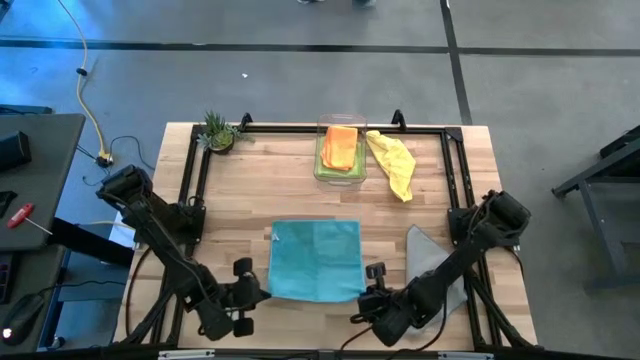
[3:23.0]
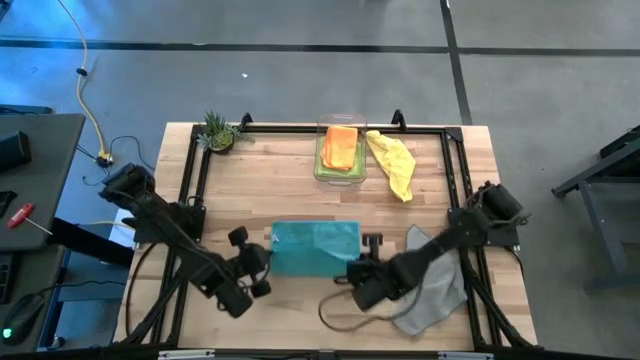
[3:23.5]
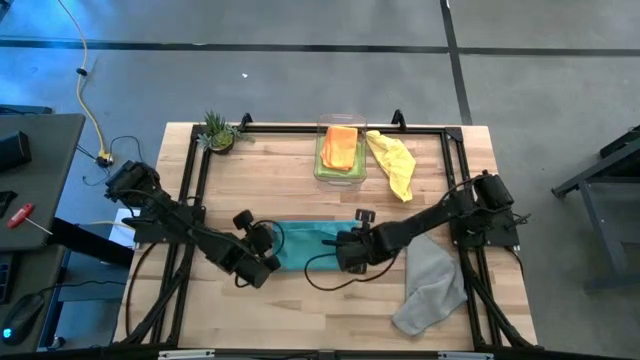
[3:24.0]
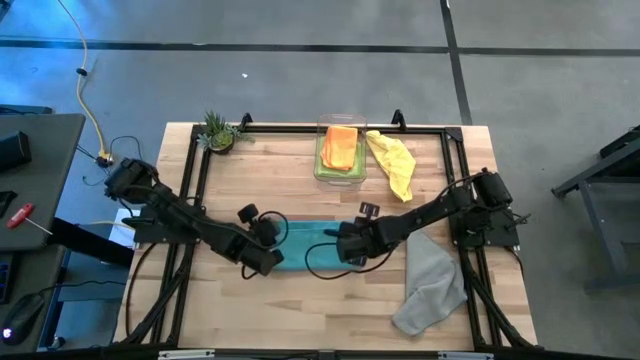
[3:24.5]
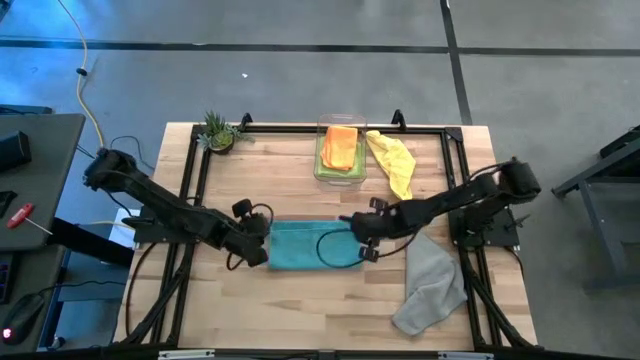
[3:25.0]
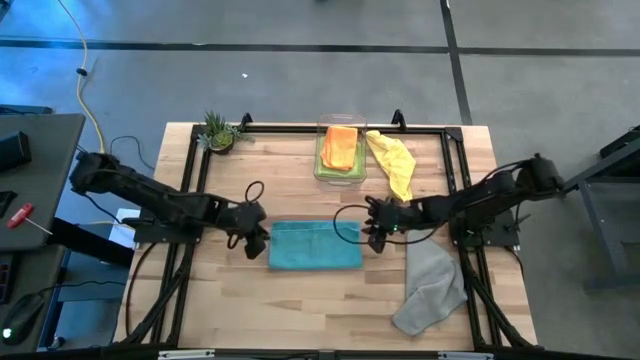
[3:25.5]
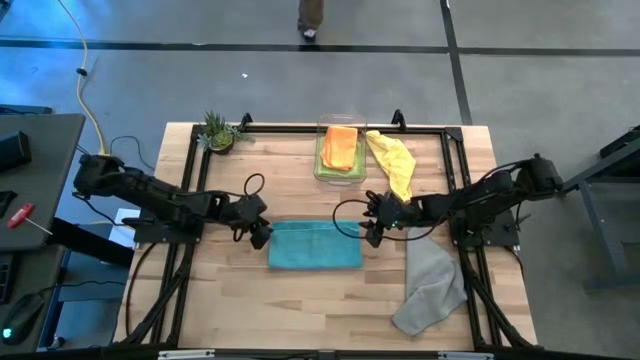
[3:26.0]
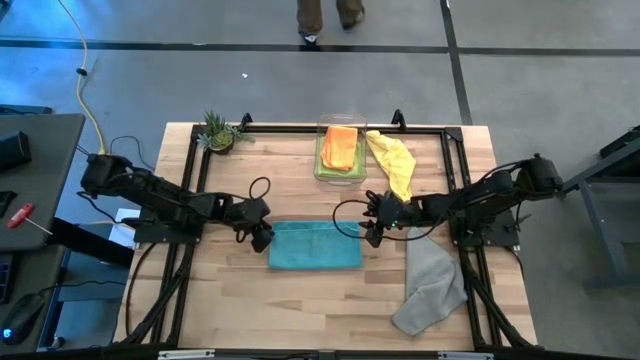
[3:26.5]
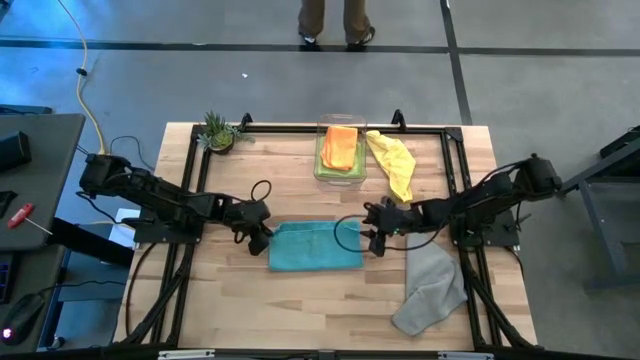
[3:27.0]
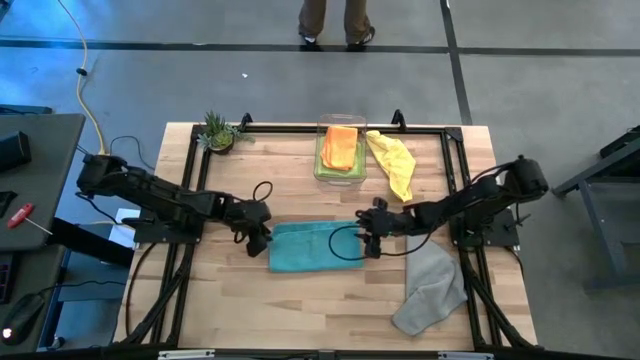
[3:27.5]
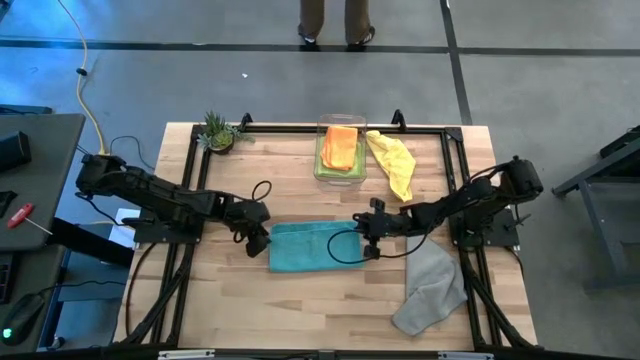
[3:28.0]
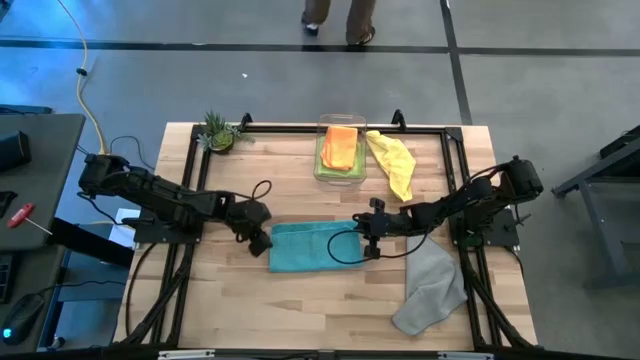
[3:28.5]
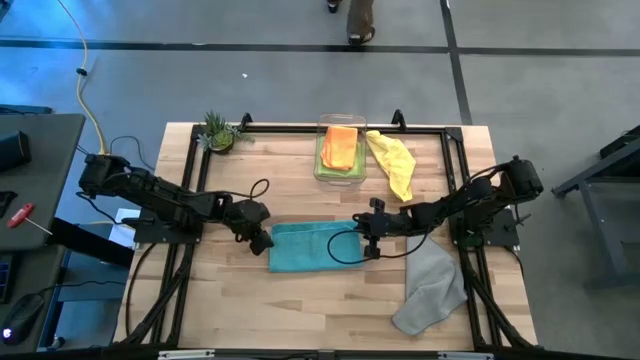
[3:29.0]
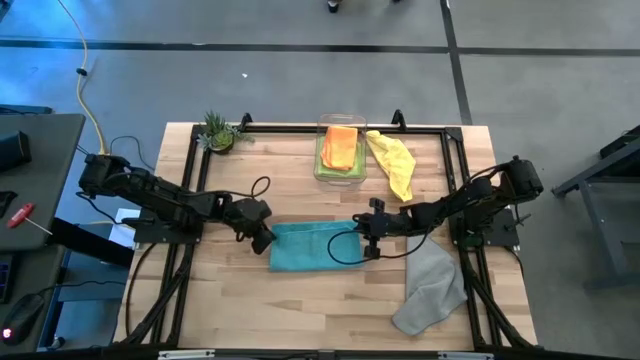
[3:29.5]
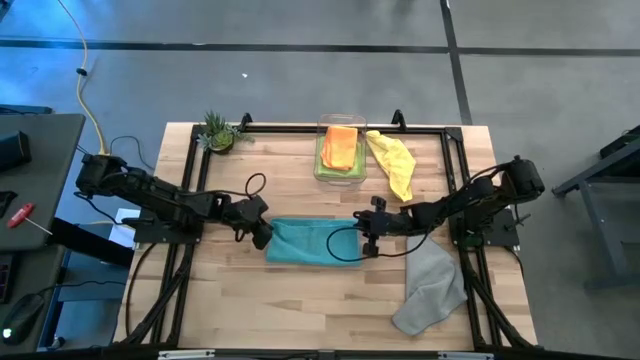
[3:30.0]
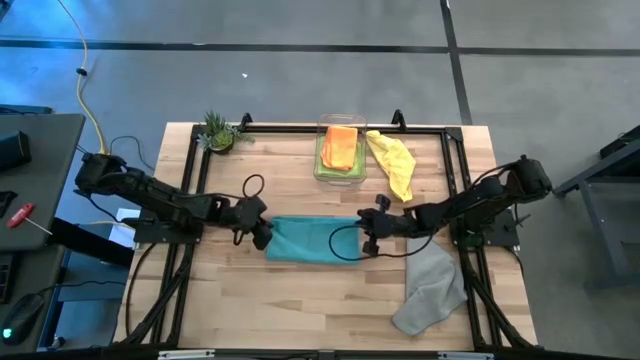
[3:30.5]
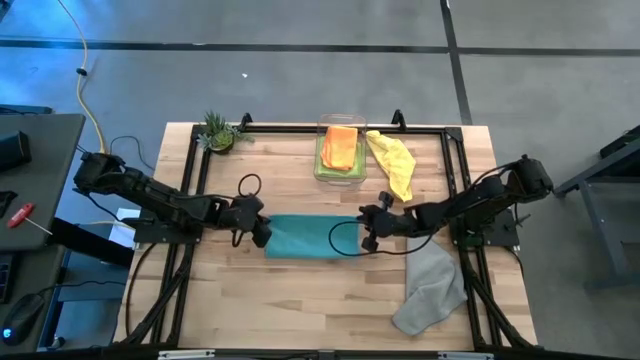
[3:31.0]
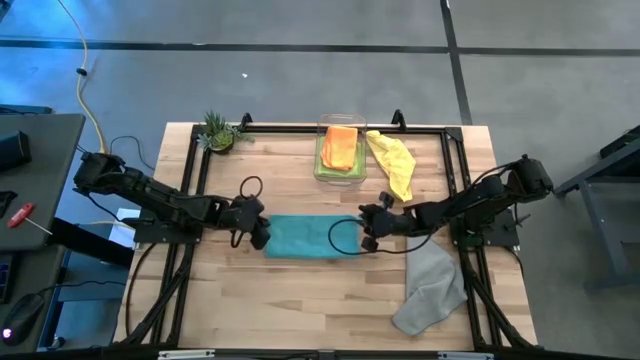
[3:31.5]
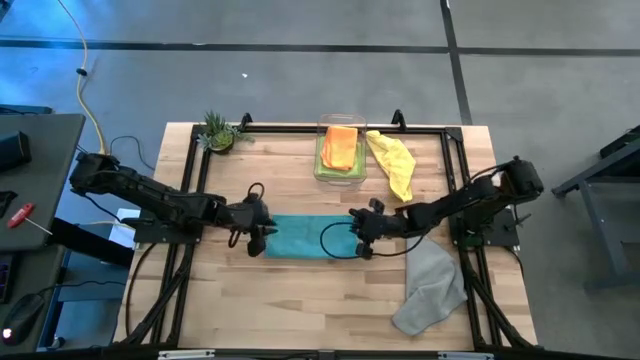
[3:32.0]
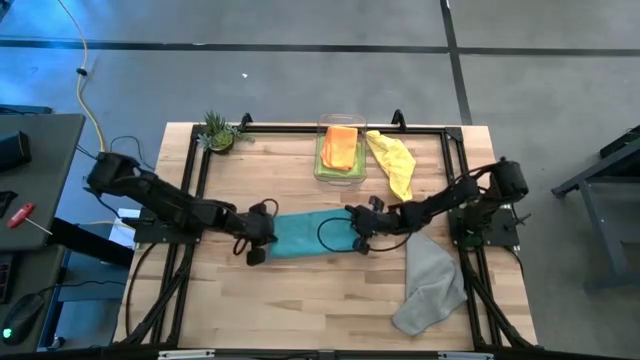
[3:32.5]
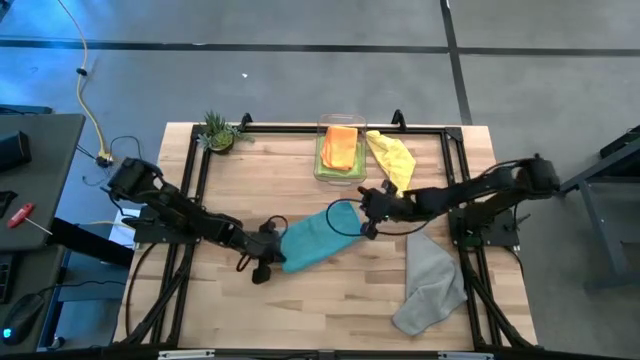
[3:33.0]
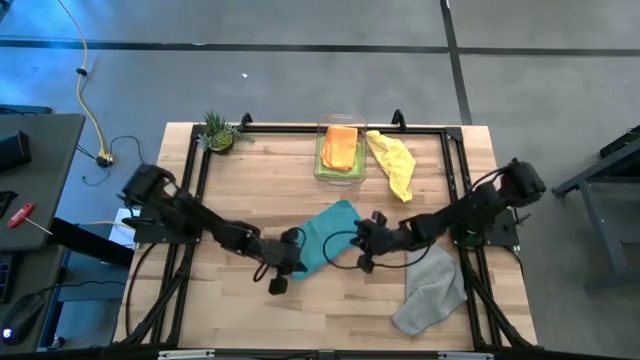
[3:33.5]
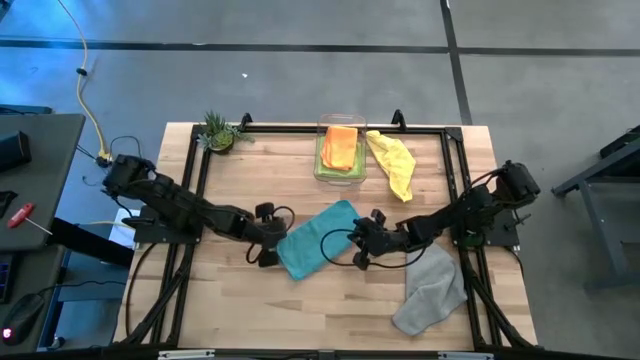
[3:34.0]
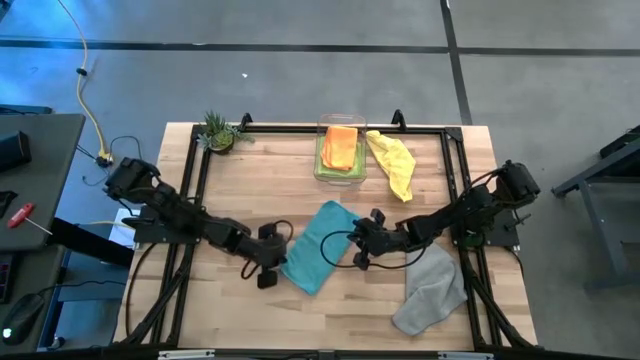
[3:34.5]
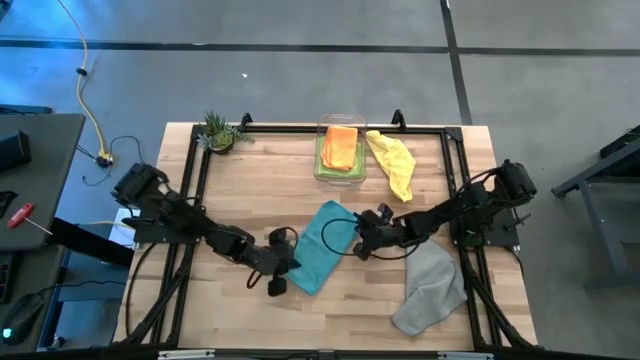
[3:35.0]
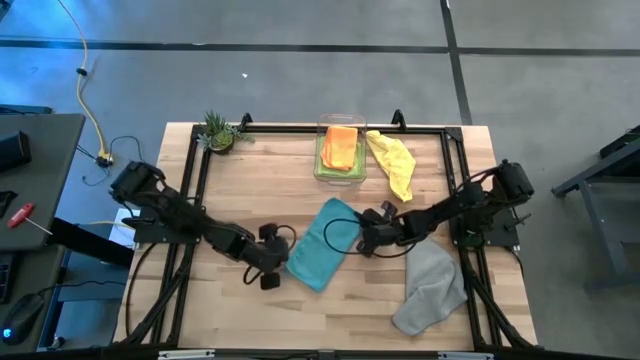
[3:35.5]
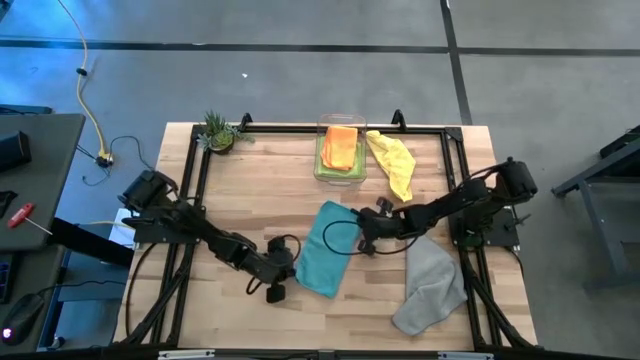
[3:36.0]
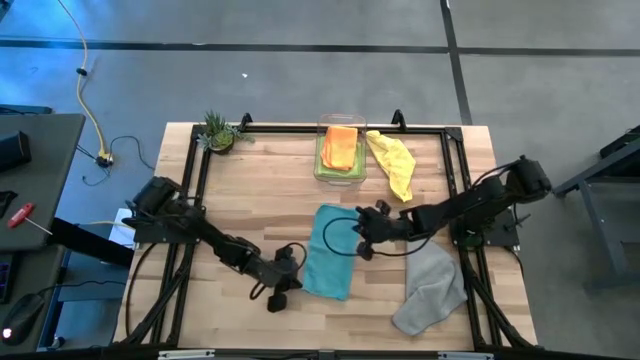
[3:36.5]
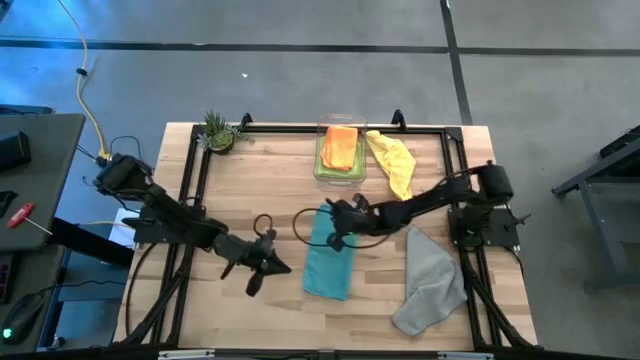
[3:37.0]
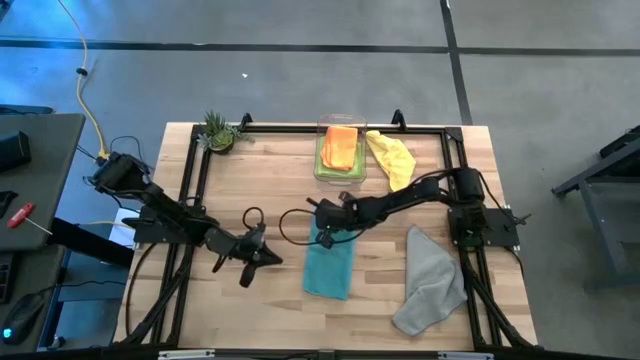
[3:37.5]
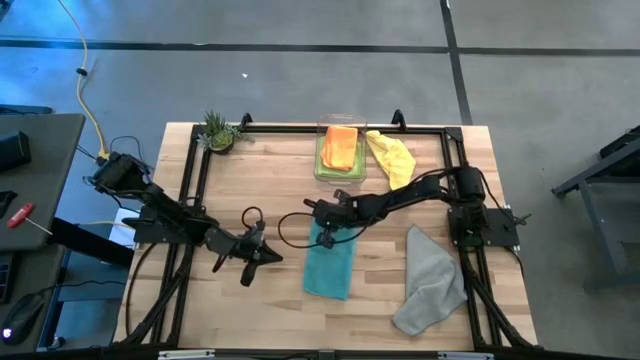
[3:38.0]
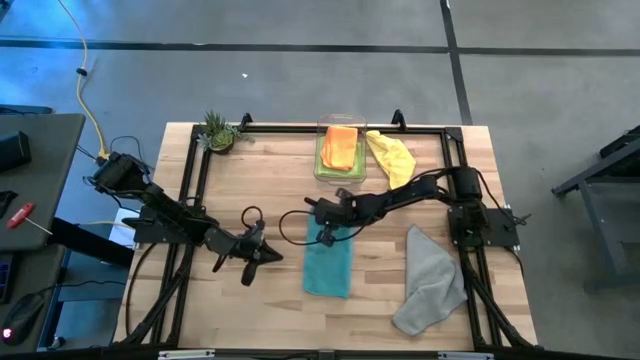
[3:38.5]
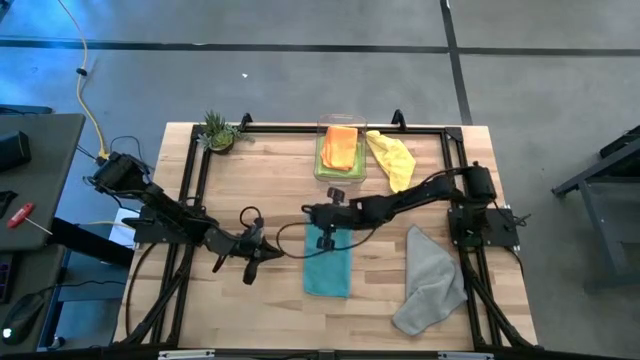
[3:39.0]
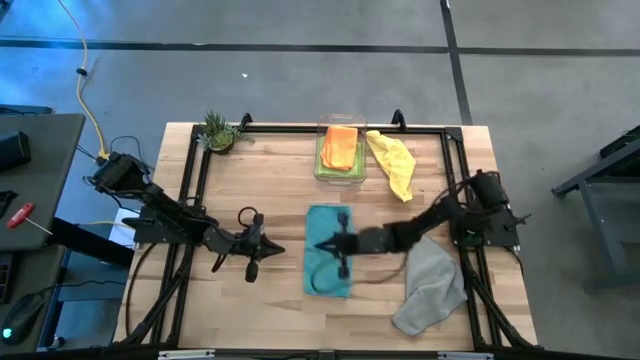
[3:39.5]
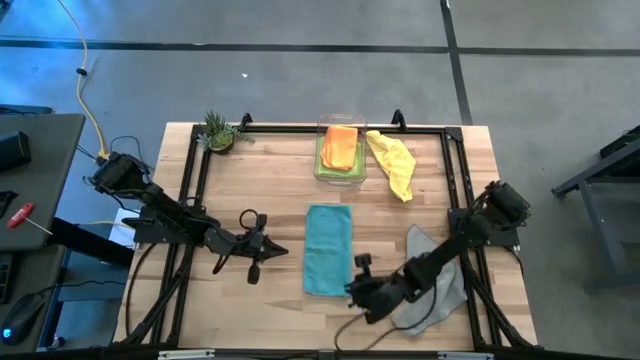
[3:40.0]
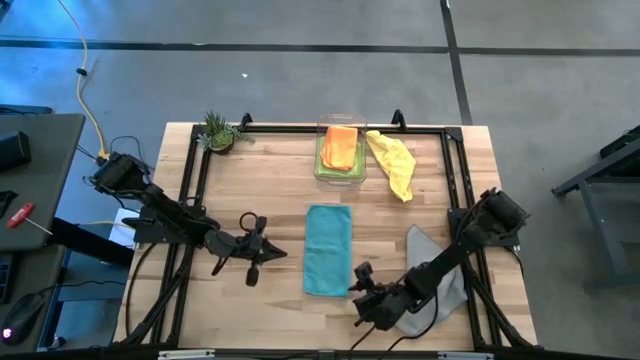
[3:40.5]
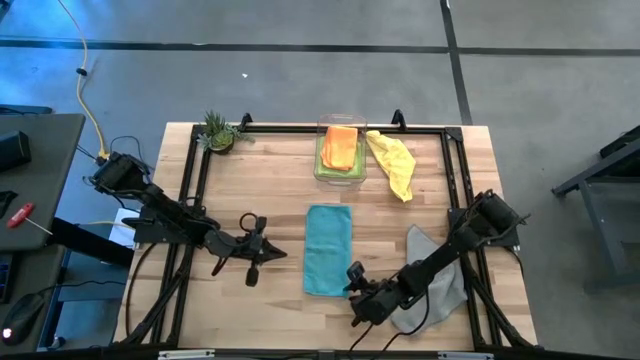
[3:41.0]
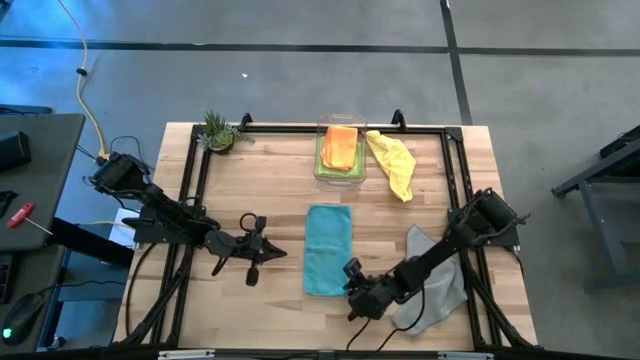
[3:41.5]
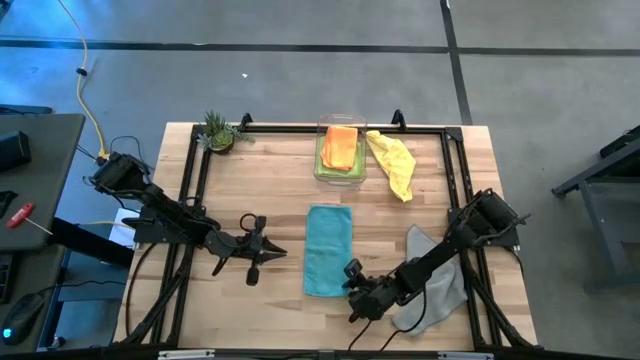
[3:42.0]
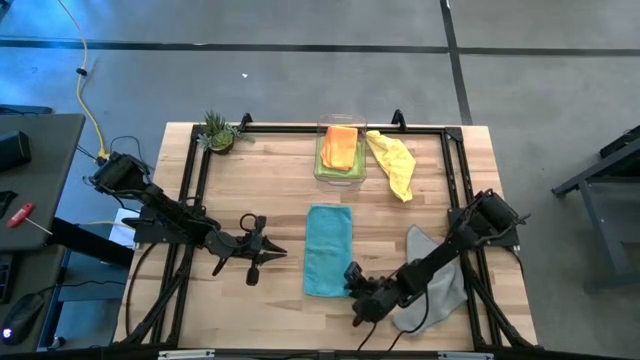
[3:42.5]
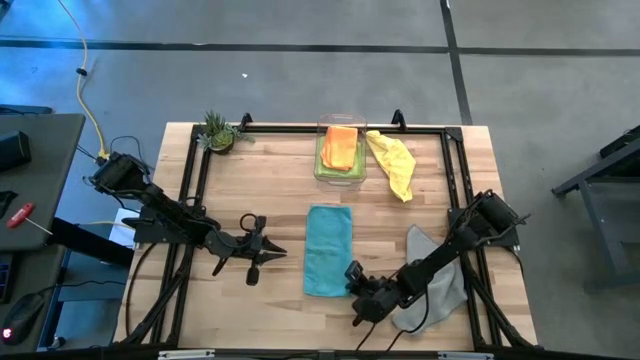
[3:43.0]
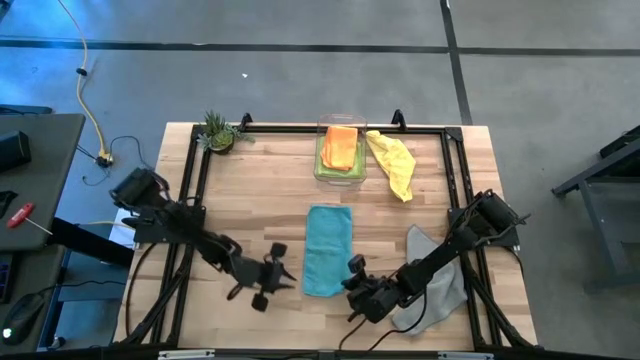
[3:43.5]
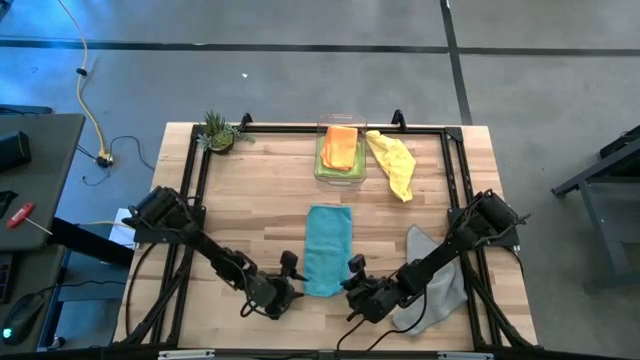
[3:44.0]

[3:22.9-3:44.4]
Task: Fold microfiber towels
Fold the blue microfiber cloth
